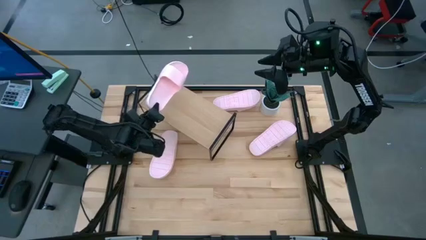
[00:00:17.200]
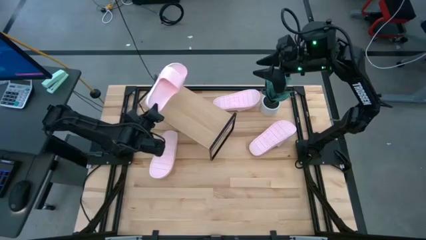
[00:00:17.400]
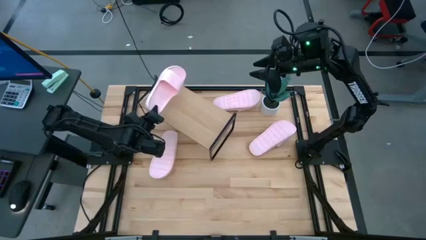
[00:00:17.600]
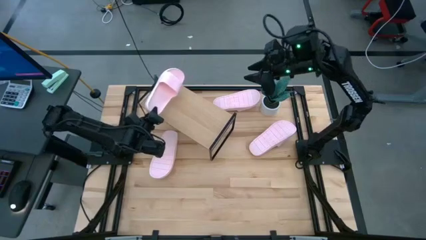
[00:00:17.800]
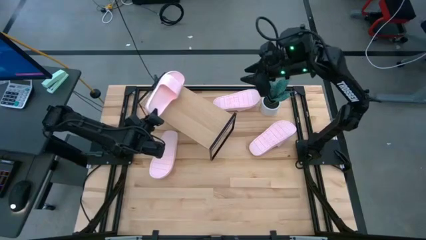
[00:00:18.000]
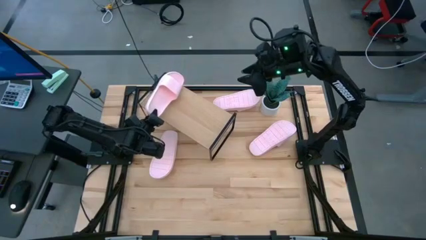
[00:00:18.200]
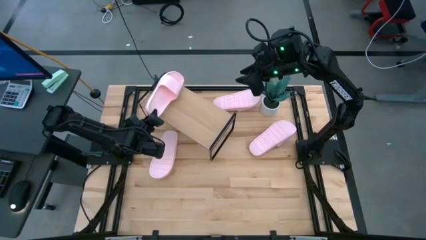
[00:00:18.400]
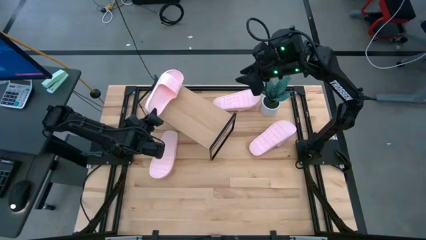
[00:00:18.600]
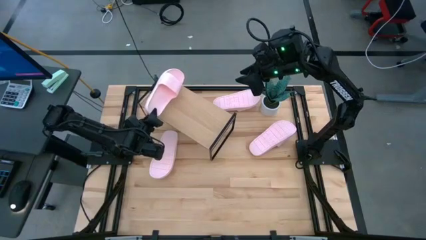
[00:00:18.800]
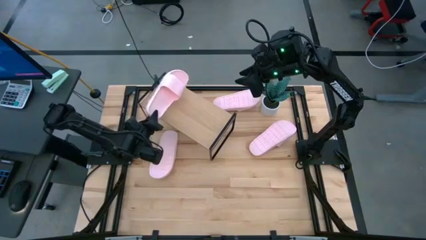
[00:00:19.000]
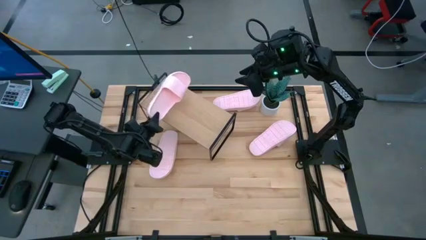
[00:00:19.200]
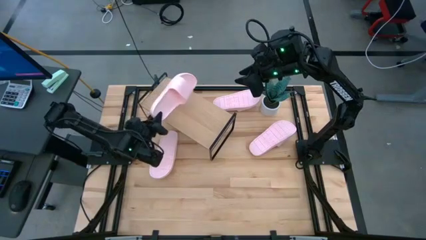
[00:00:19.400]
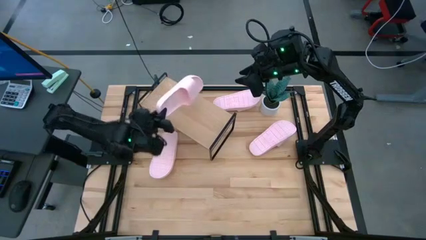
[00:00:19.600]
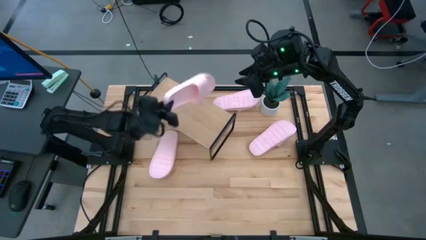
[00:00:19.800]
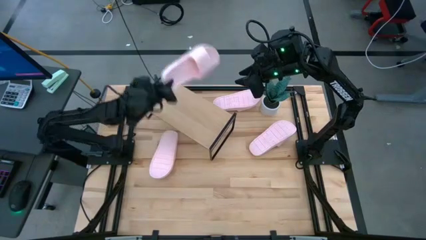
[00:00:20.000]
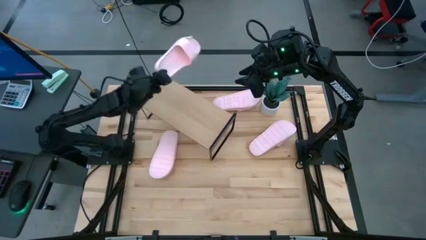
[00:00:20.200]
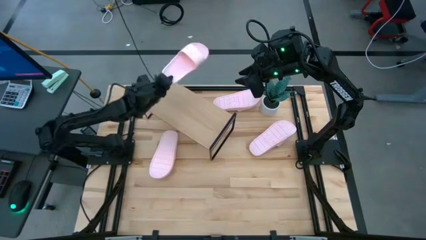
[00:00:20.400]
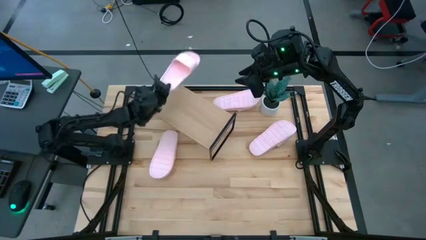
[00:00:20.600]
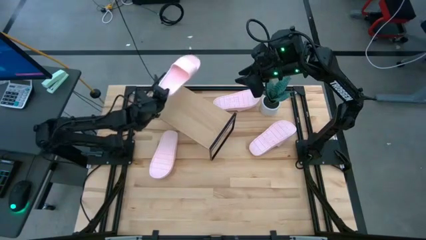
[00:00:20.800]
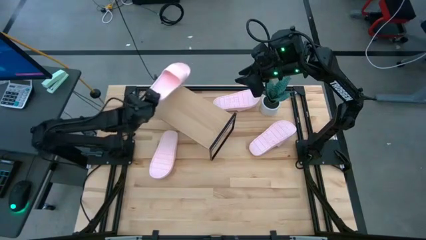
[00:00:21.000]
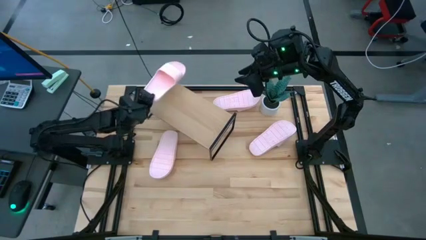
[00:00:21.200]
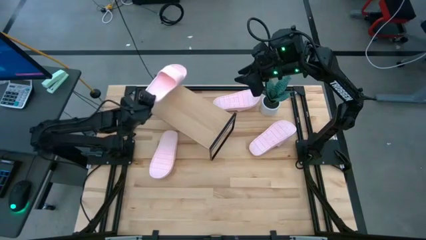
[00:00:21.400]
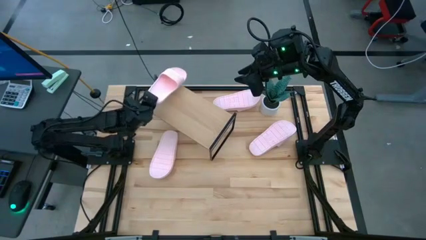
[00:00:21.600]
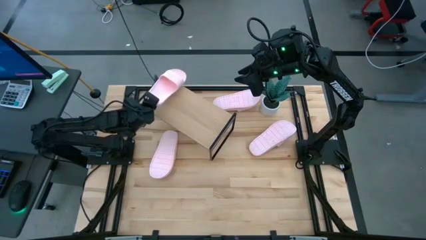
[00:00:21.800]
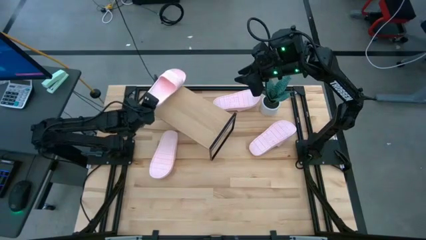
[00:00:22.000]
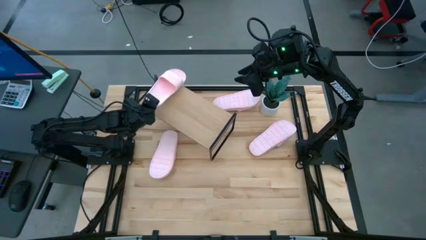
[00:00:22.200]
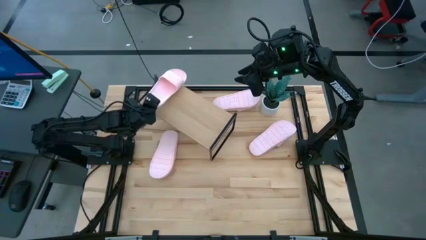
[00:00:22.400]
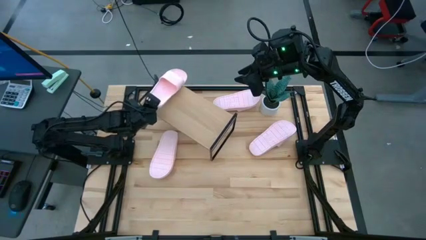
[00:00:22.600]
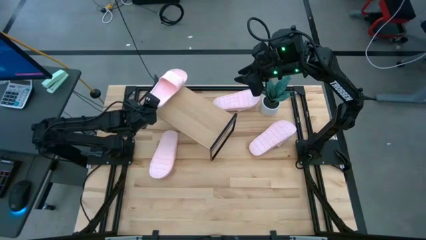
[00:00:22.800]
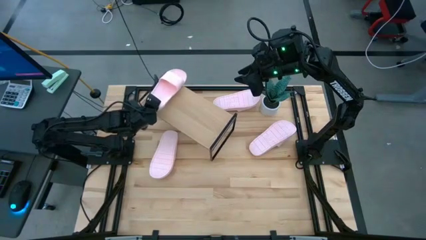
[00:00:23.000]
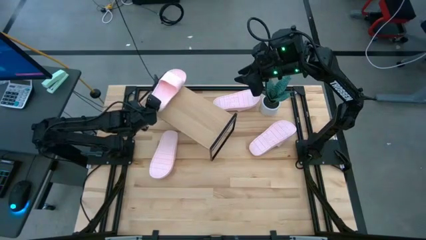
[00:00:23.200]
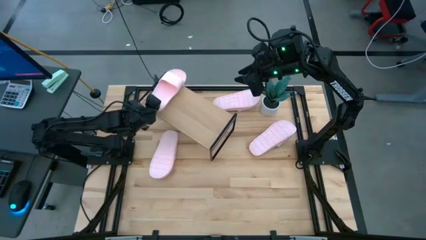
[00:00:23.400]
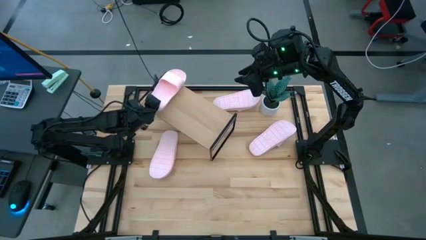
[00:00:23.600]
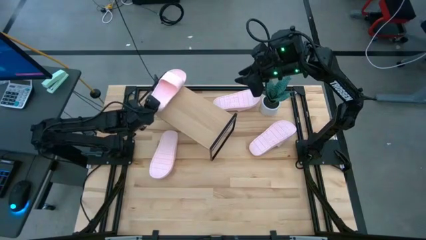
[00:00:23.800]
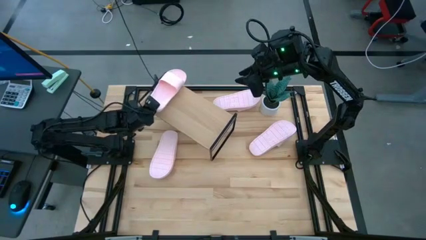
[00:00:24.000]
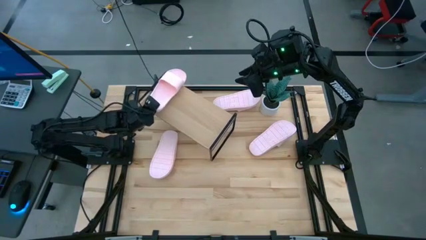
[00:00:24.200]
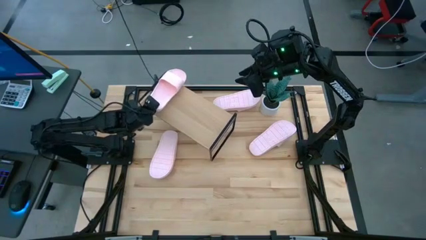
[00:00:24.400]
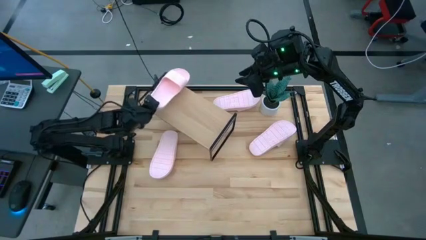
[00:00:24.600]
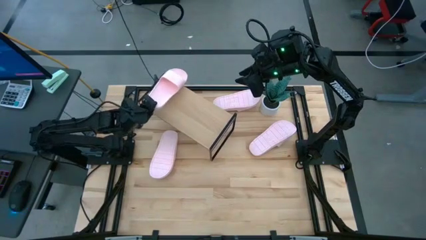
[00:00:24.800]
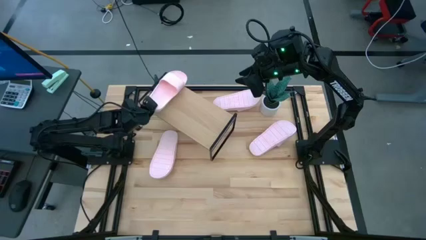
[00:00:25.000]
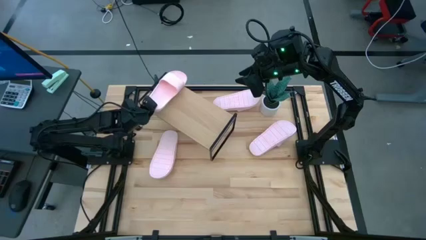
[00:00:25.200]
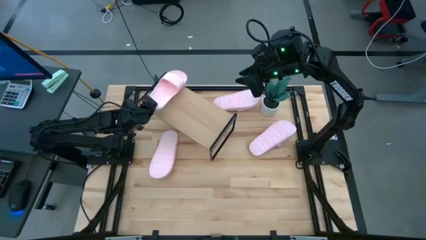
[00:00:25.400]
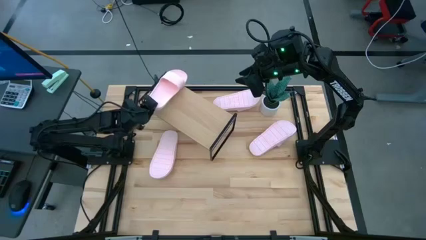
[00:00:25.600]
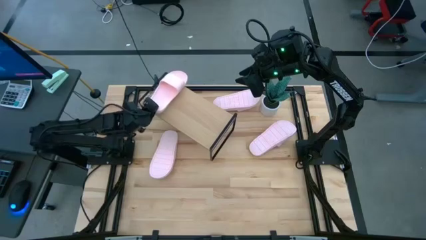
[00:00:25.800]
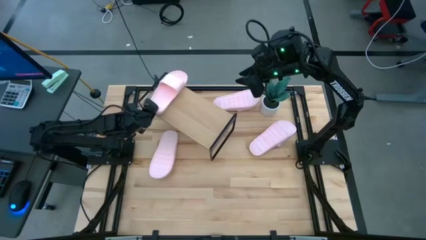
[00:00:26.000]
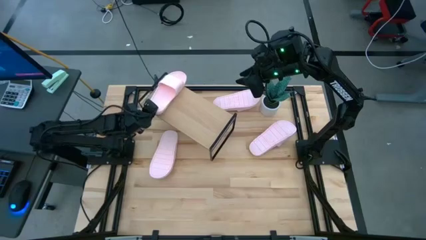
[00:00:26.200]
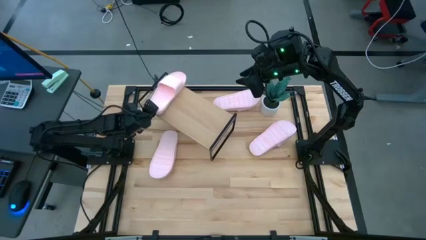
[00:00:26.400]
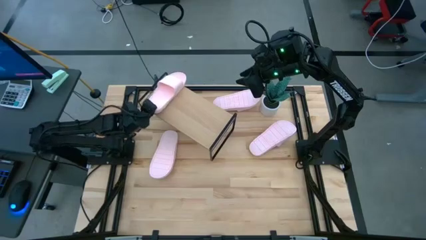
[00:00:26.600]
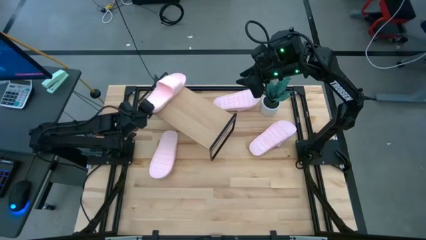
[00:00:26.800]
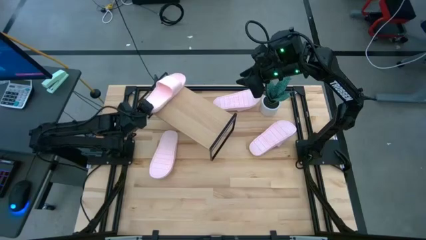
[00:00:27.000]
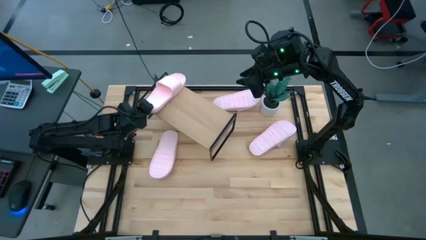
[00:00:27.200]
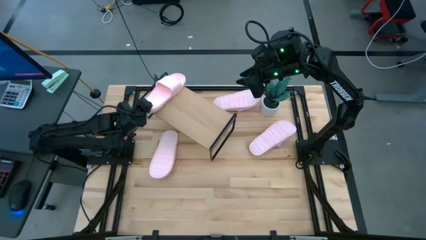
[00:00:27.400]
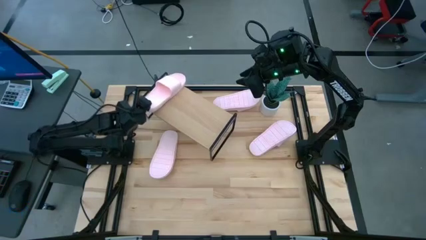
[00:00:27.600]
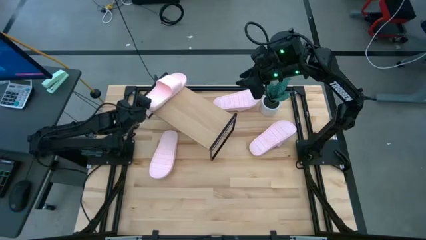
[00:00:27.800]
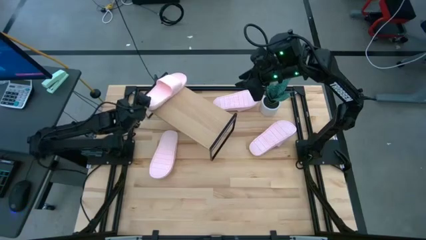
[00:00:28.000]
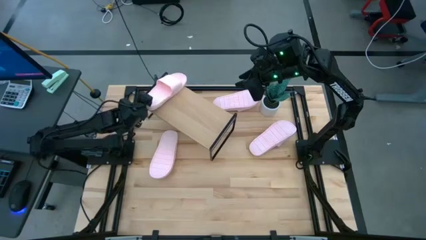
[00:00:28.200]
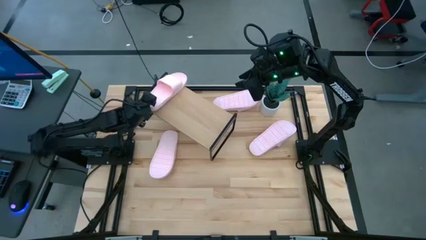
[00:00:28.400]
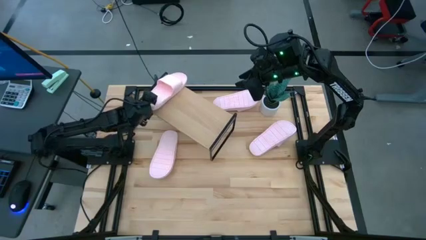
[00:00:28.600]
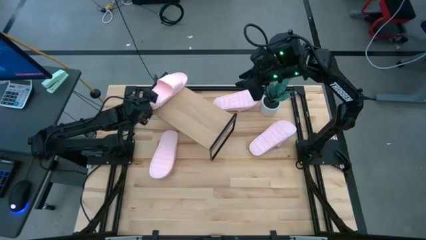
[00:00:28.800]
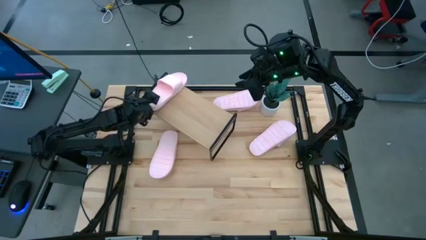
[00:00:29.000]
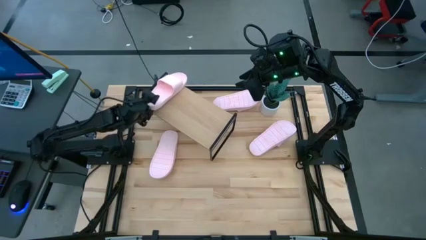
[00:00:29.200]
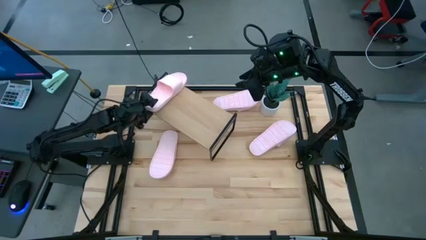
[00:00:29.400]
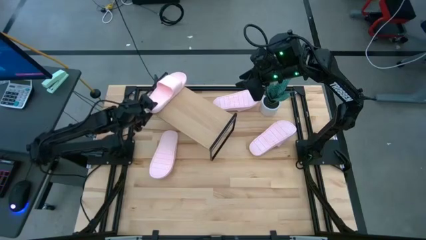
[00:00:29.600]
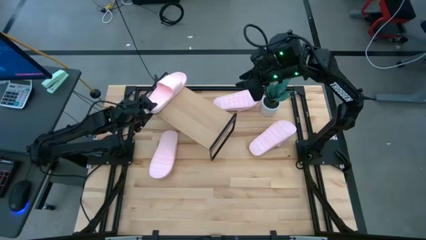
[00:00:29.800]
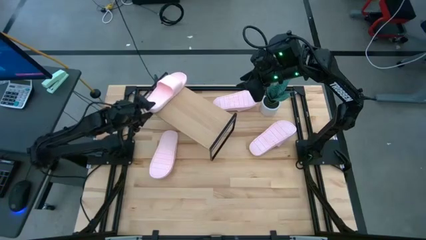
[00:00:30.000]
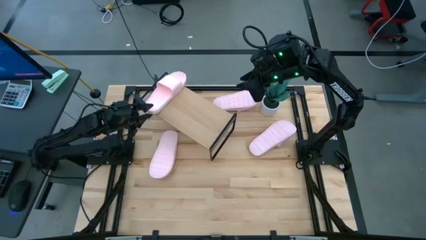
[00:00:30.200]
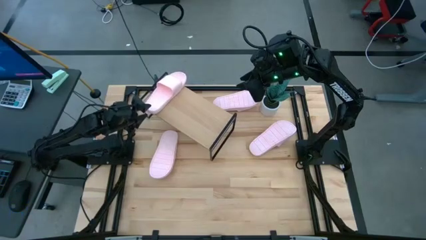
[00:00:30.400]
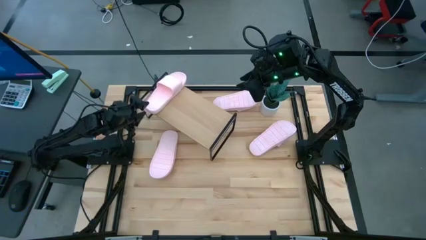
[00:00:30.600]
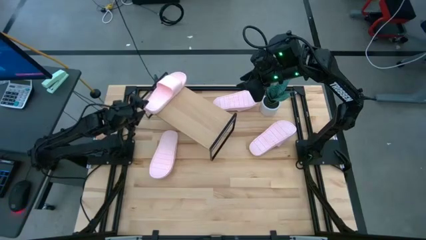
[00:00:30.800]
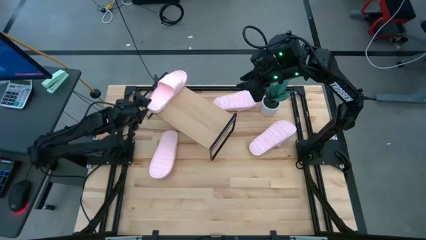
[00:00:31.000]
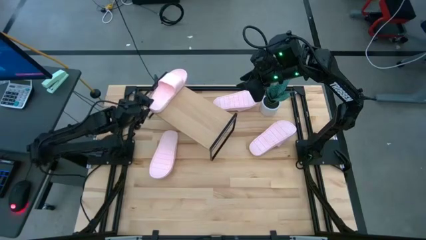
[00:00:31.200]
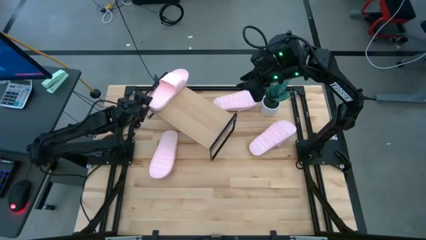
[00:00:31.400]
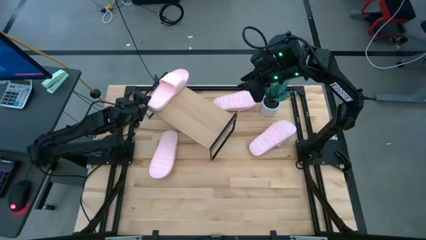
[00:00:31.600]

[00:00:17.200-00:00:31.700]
Task: Pick and place slides into the shelf
Put the pink slipper on the shelf
